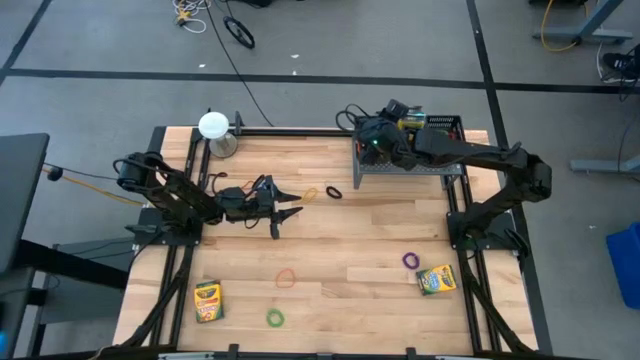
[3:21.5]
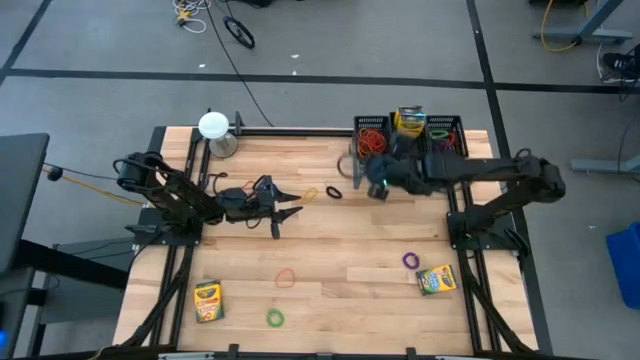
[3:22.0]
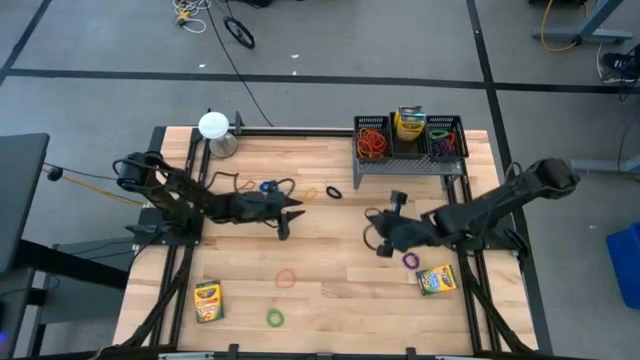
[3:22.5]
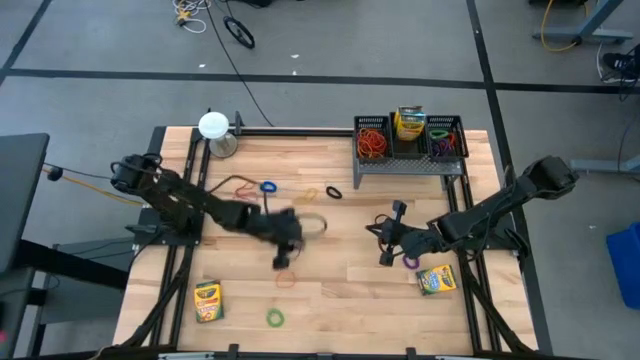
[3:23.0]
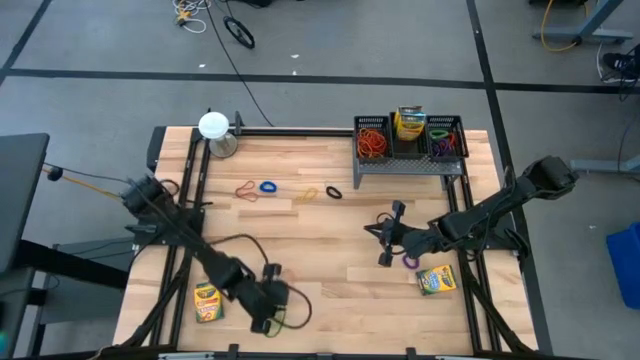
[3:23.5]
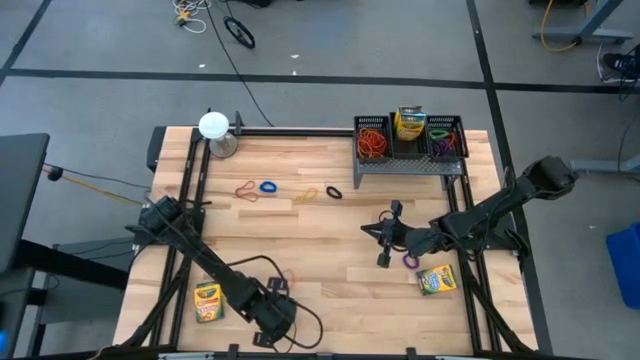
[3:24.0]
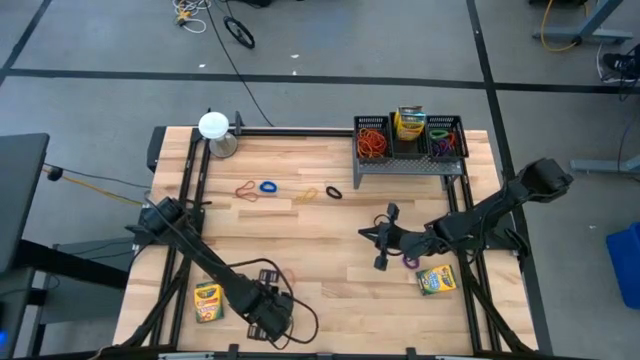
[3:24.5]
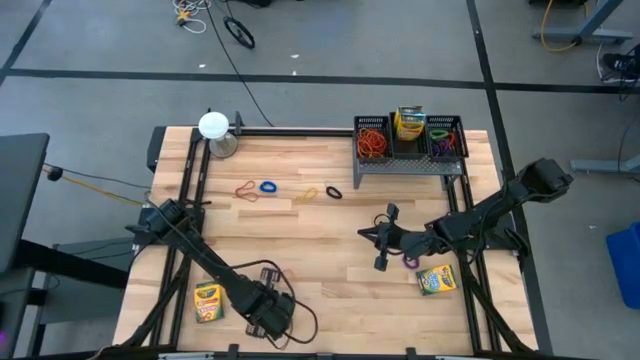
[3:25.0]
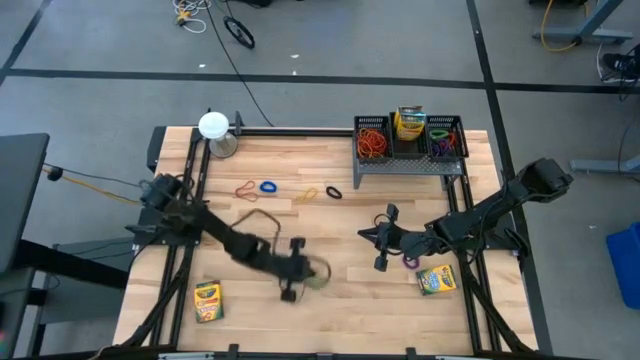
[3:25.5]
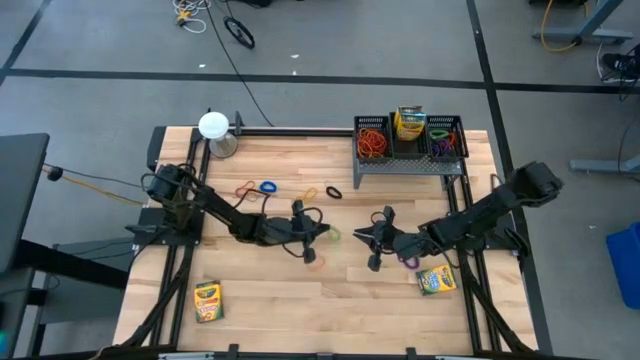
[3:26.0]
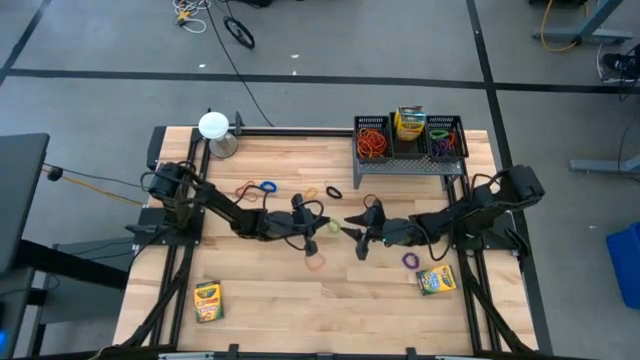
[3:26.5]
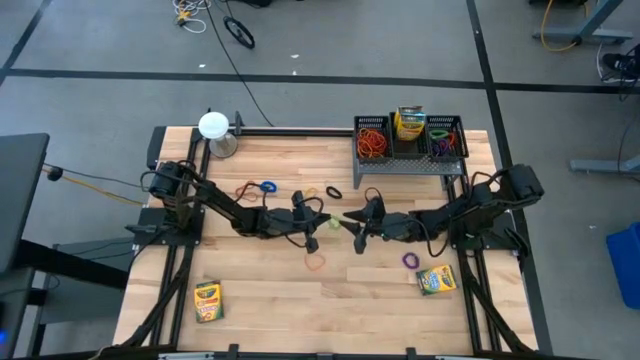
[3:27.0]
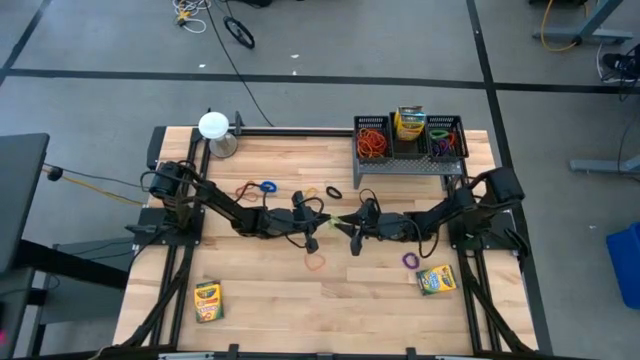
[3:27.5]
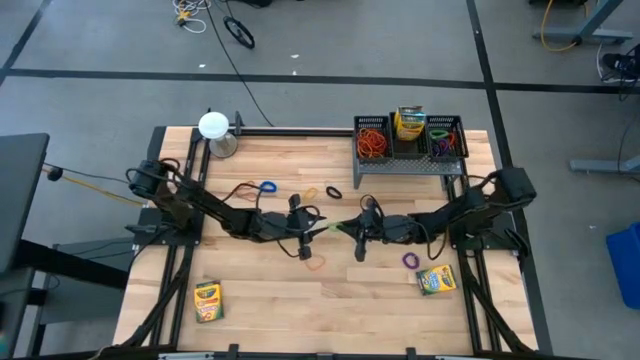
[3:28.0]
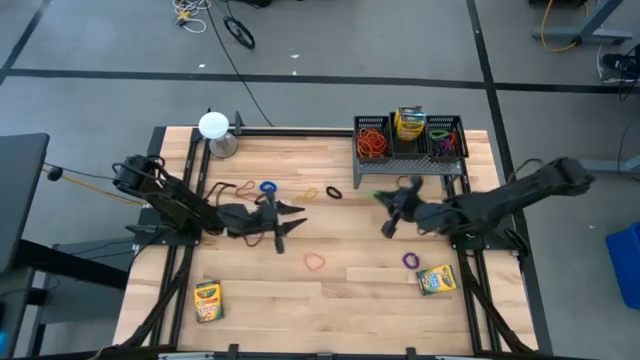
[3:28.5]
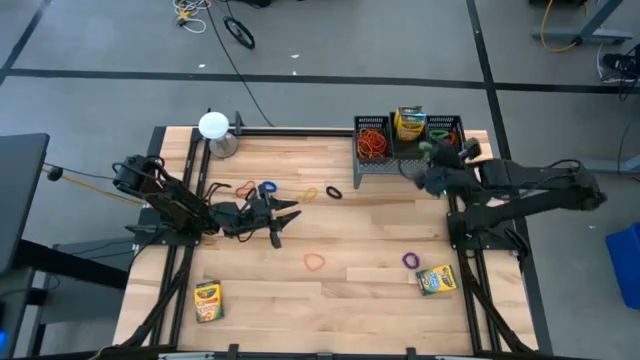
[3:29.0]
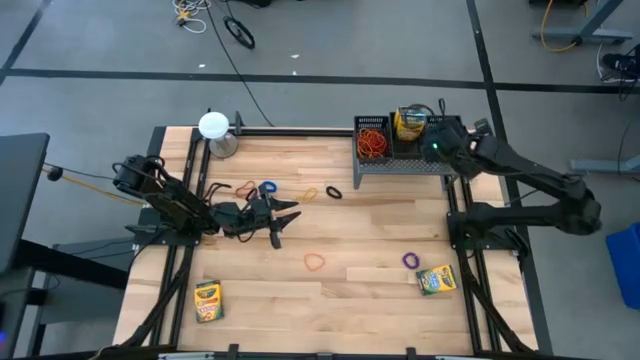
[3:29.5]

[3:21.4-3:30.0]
Task: Pick & Place Office Desk Supplies
Put the green spring keychain into the right black bin on the shelf

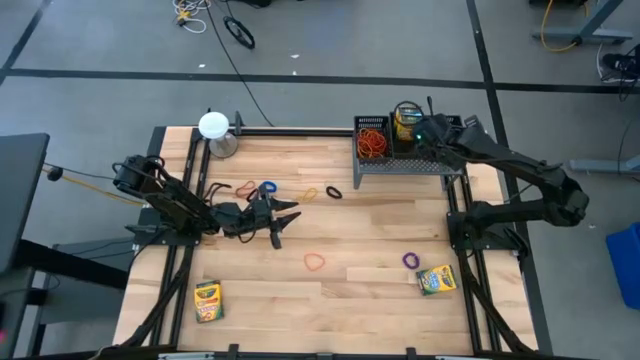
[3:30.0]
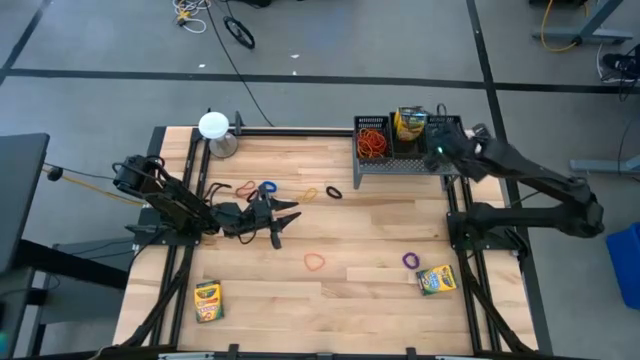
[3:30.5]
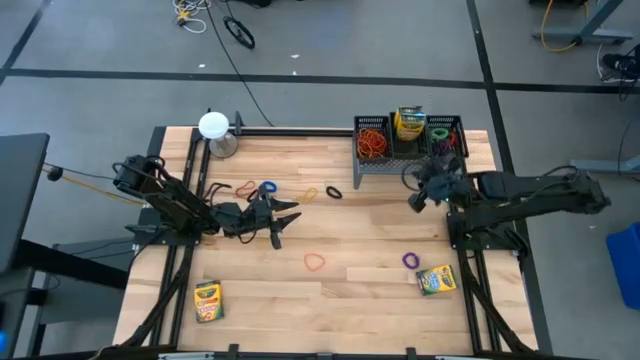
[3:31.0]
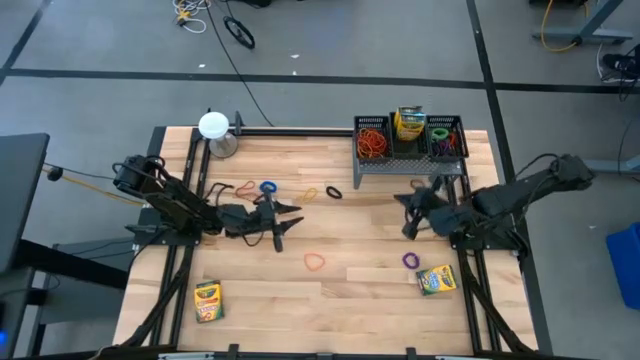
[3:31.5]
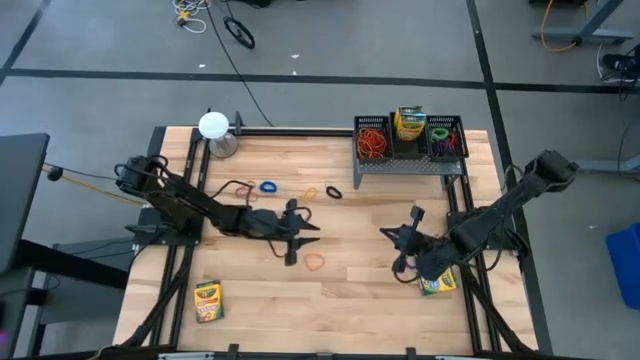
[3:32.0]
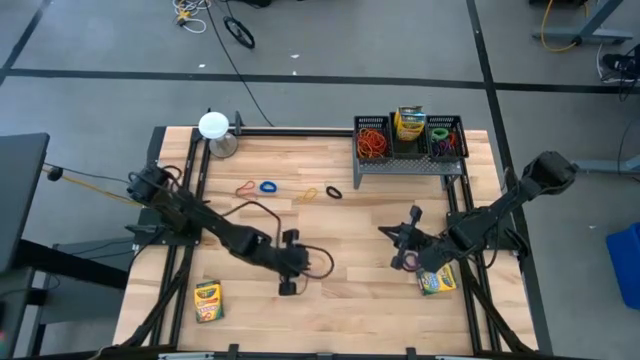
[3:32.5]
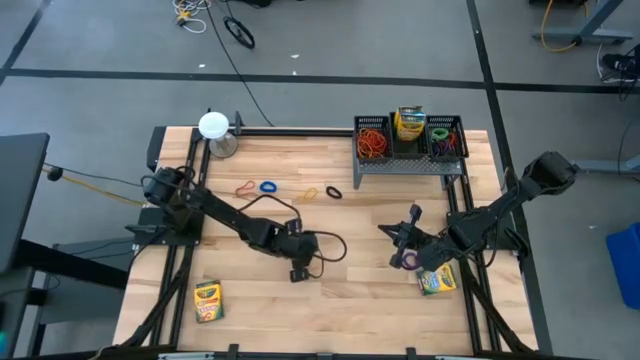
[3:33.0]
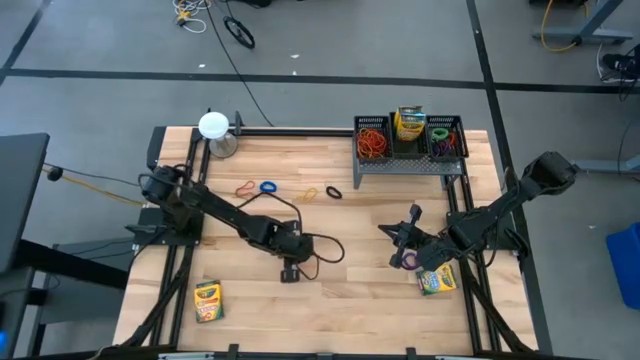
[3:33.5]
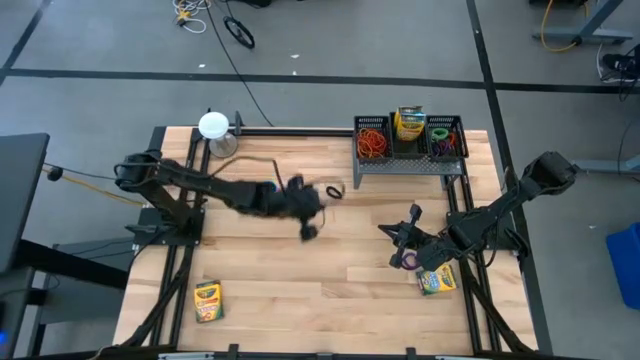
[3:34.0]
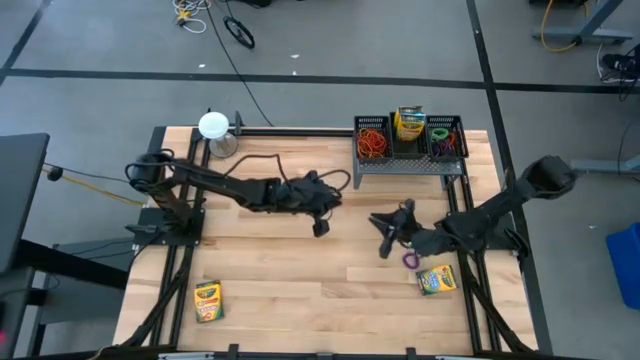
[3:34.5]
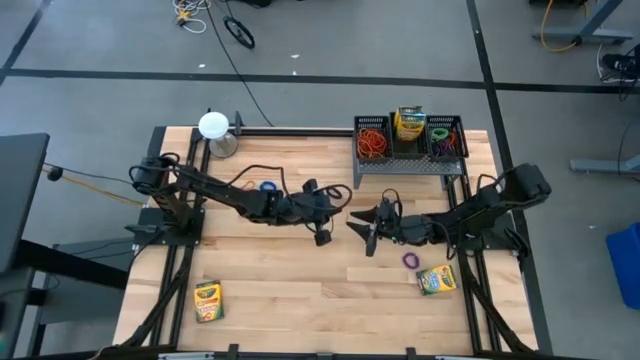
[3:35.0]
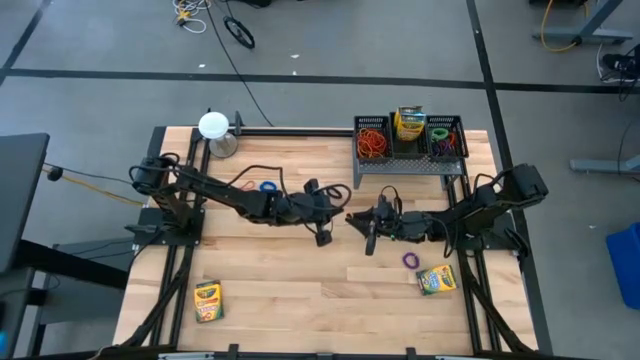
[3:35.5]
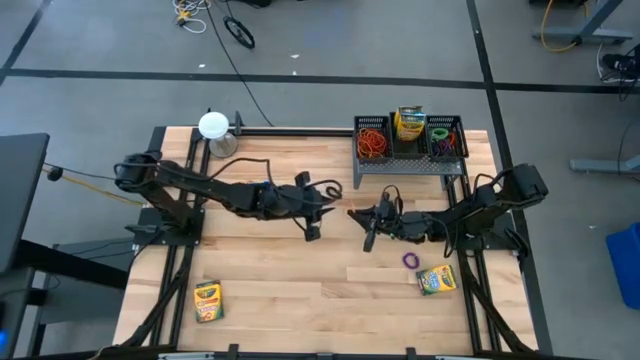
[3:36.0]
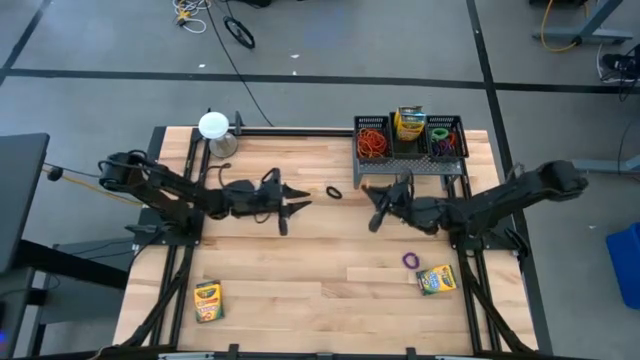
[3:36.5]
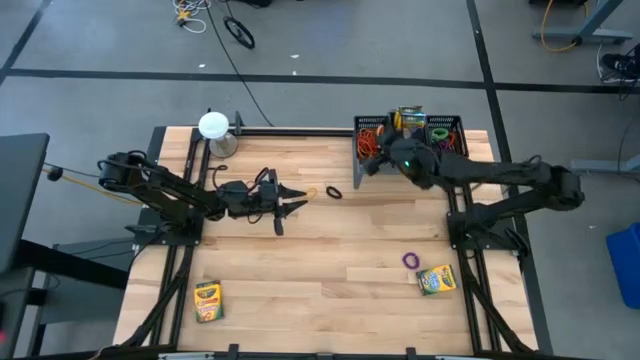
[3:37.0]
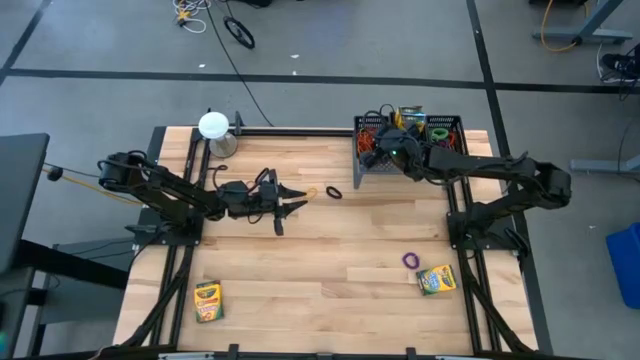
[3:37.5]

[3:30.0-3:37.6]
Put the orange rubber band into the left black bin on the shelf

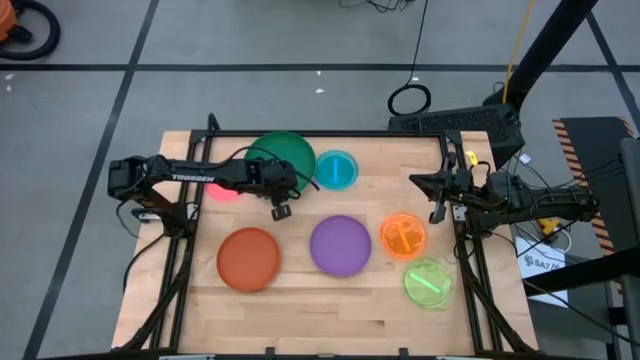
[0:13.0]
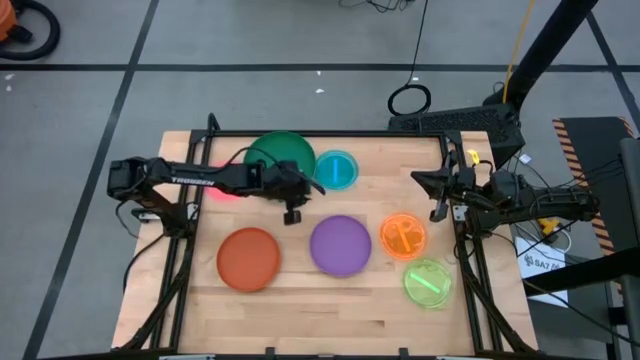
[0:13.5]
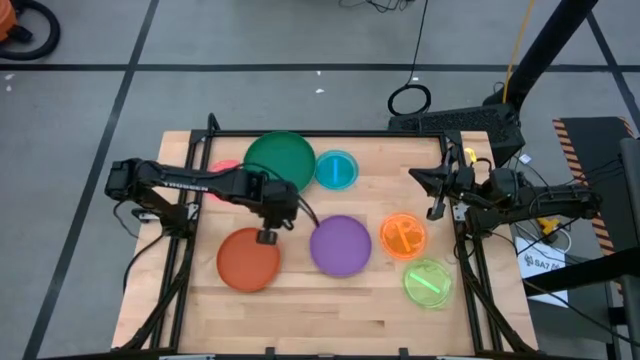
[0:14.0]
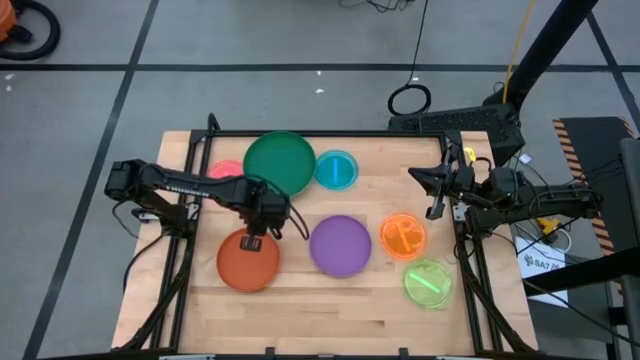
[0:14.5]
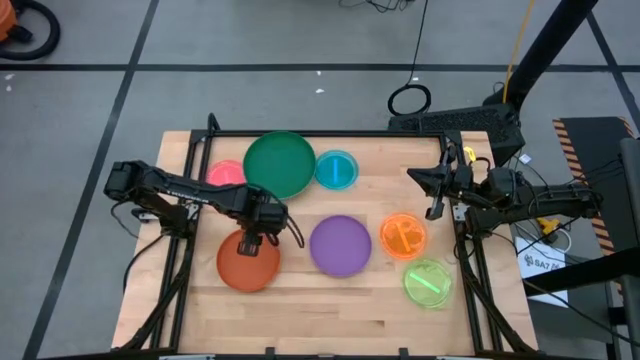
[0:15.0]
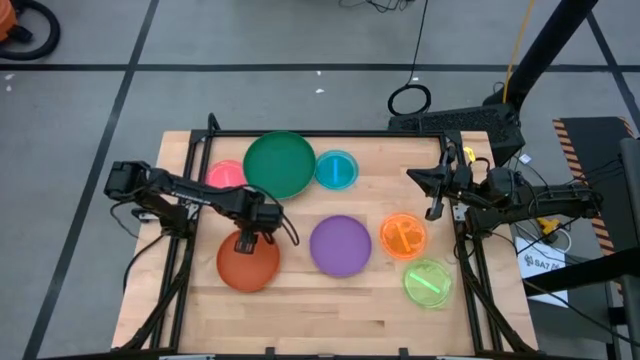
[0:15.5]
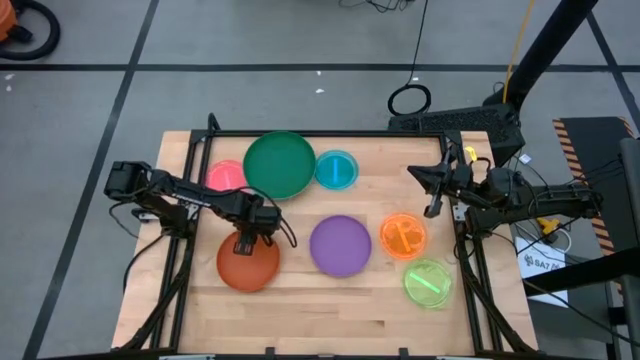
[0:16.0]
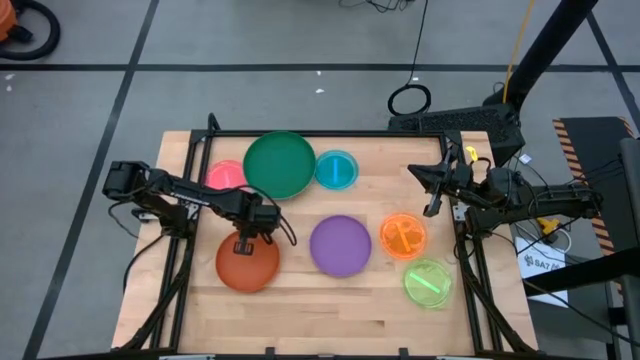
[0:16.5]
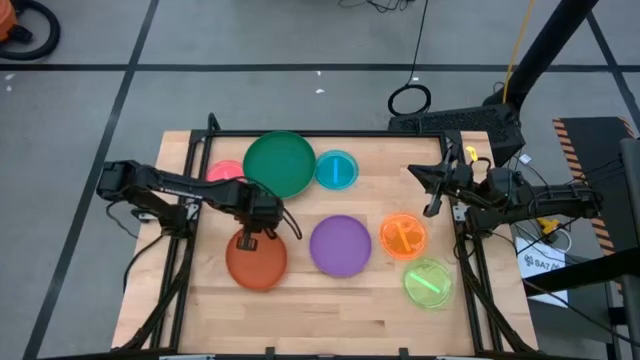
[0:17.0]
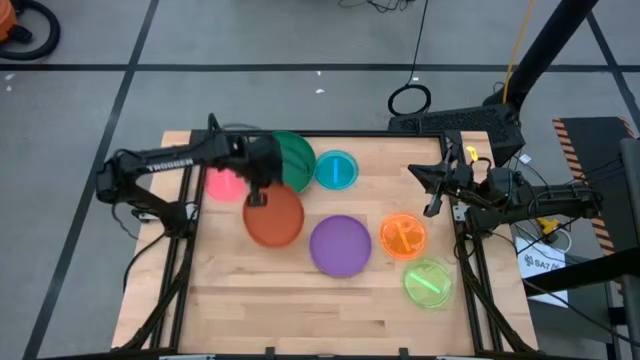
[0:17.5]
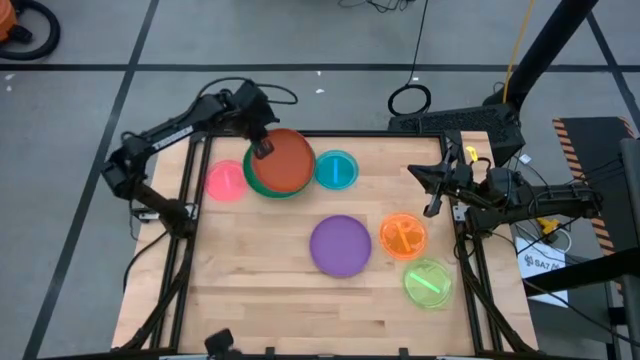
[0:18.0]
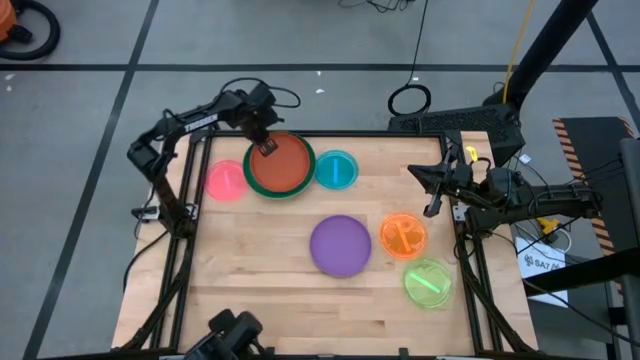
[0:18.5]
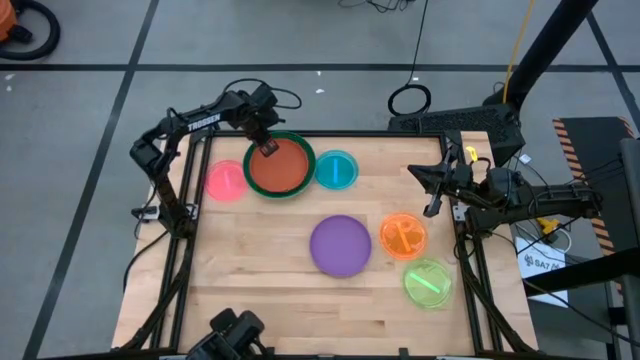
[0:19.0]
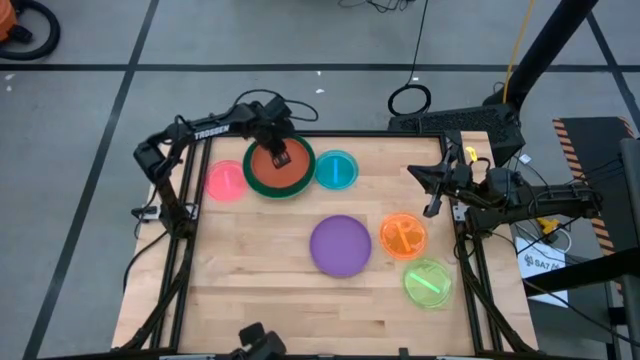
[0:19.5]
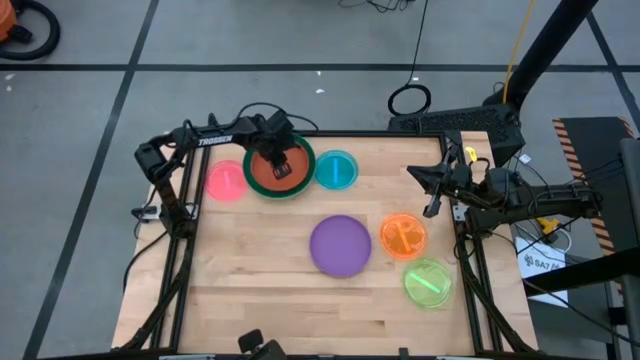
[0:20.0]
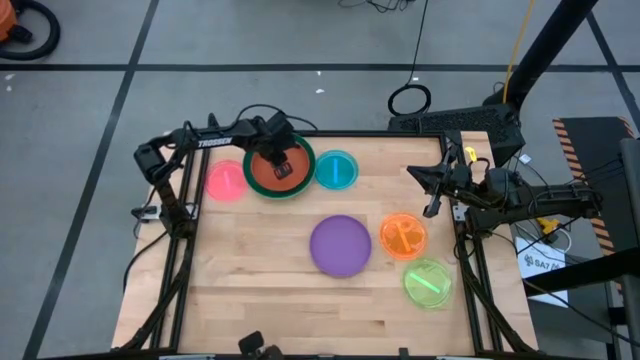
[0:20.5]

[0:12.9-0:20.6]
Task: Stack plastic plates
Stack the dark orange plate on top of the dark green plate
